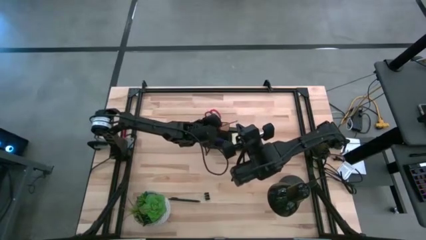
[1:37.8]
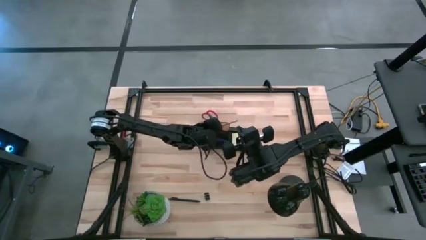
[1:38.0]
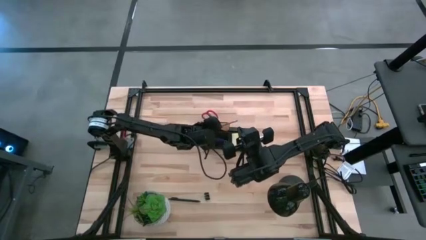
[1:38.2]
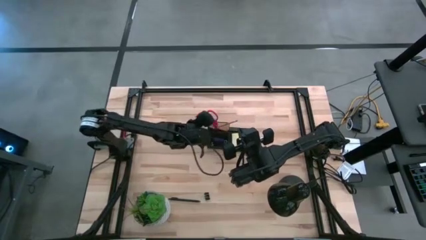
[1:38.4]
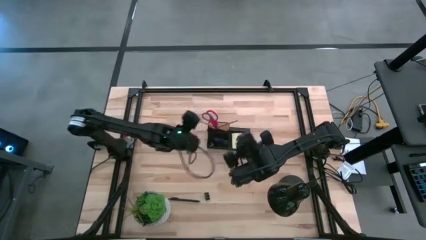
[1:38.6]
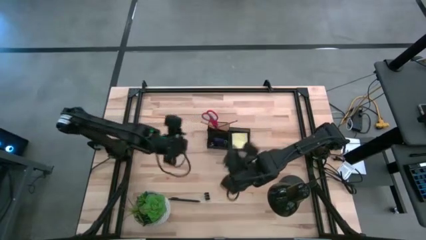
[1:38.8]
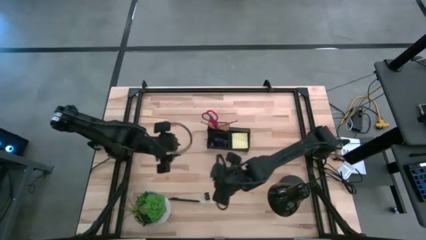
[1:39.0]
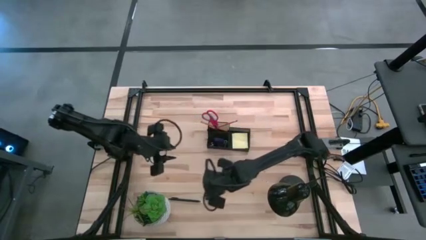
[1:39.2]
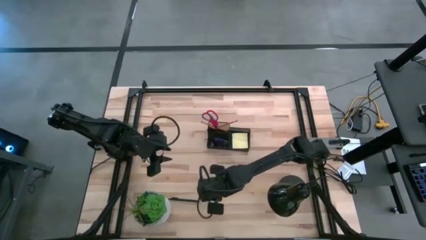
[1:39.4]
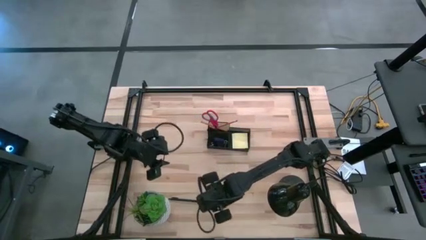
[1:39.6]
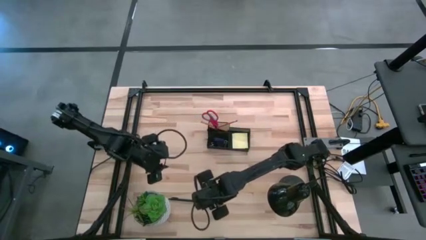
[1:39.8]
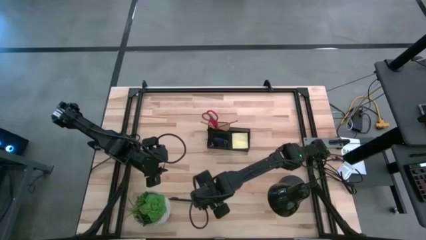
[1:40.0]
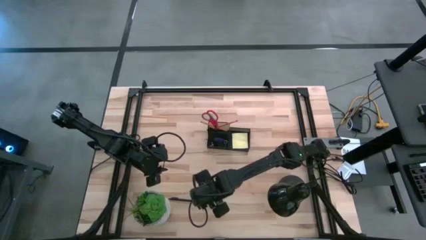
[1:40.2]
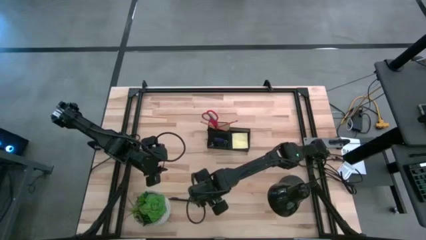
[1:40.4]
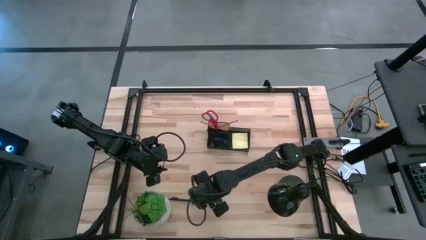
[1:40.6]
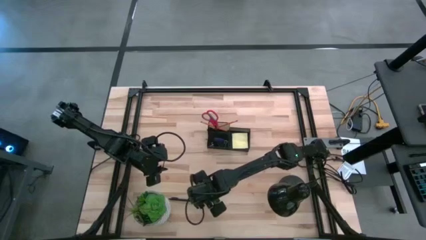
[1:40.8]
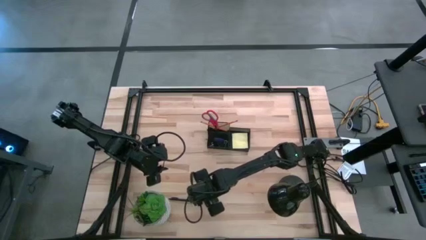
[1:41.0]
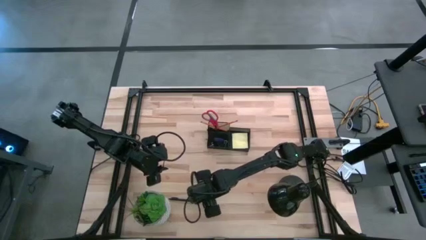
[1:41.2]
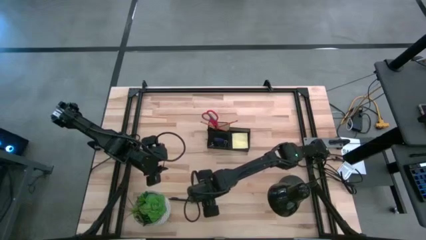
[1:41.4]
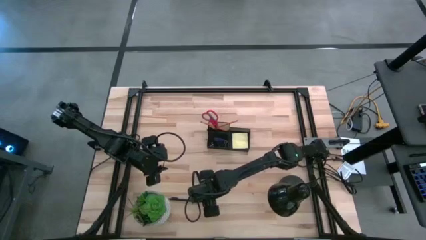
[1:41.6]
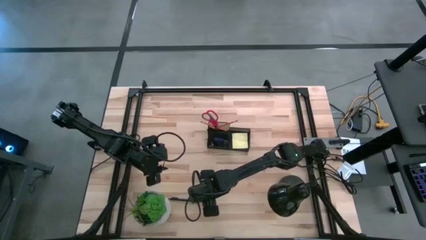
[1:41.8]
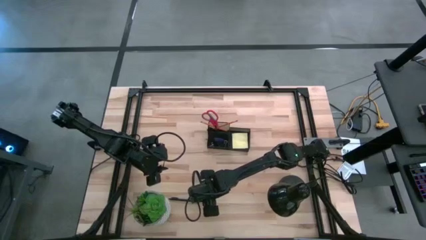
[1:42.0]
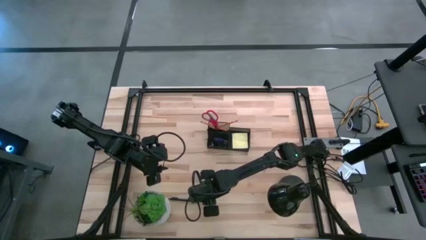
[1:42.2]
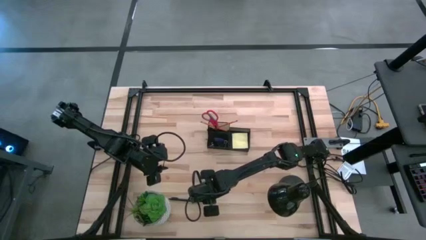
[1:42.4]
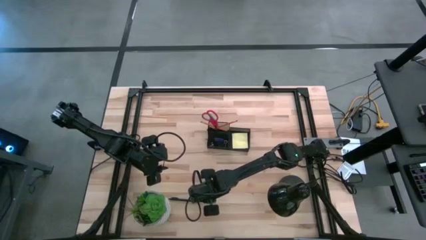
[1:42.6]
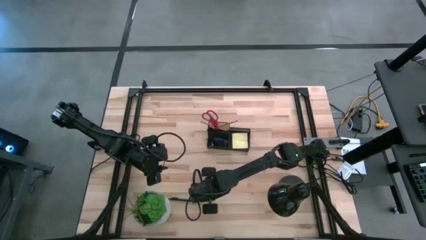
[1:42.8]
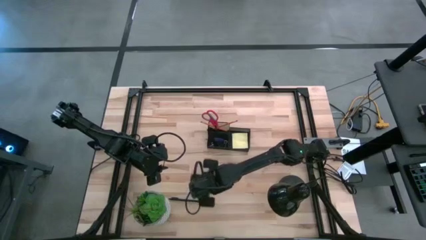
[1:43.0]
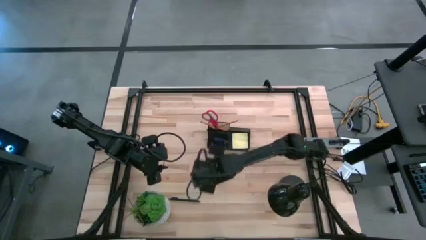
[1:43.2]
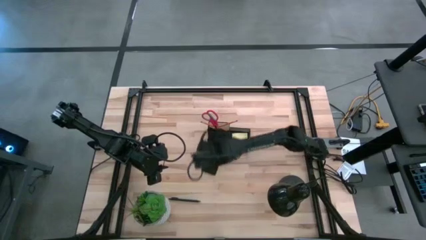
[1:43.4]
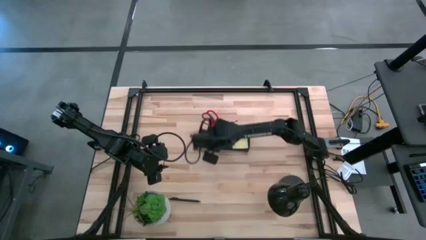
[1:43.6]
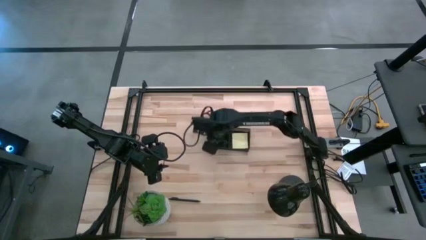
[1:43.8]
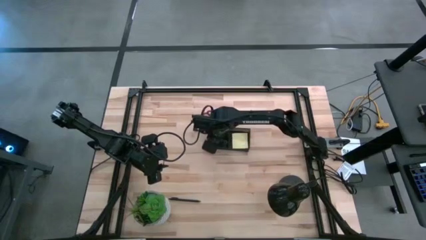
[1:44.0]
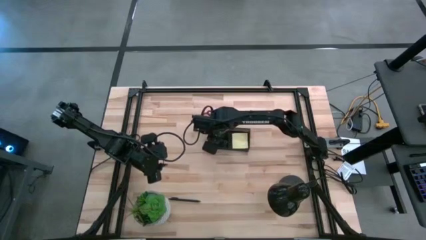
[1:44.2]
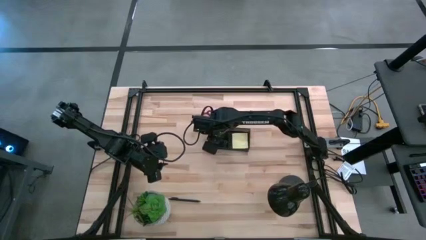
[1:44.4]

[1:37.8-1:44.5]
Task: Pick and place office supplies into organizer
Put the black binder clip into the desk organizer

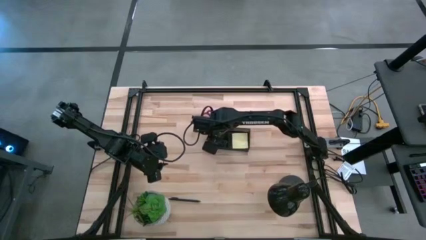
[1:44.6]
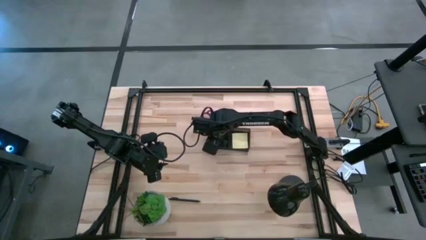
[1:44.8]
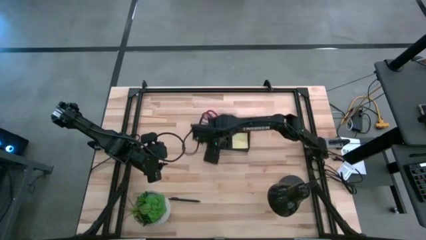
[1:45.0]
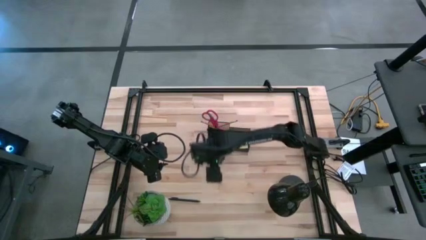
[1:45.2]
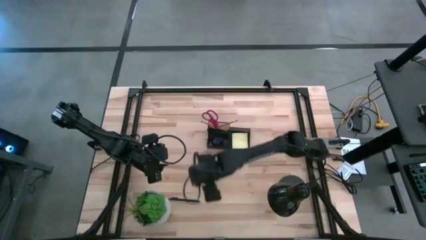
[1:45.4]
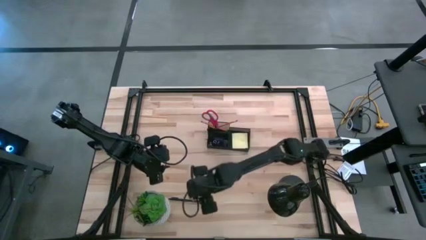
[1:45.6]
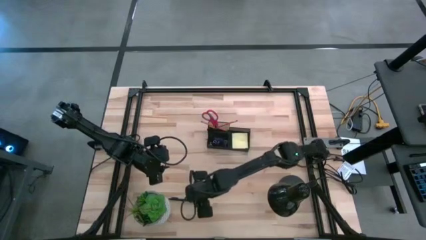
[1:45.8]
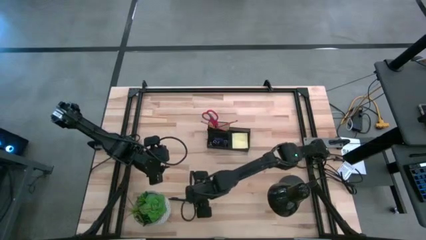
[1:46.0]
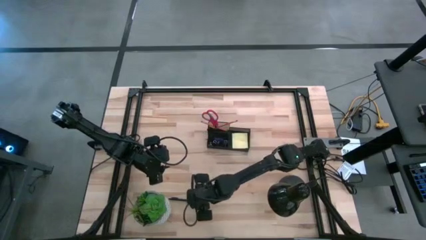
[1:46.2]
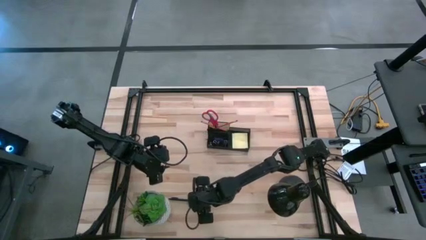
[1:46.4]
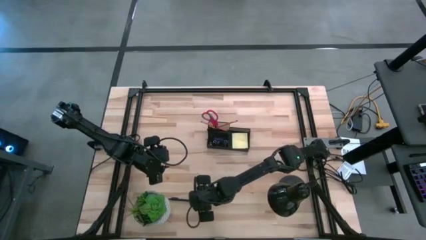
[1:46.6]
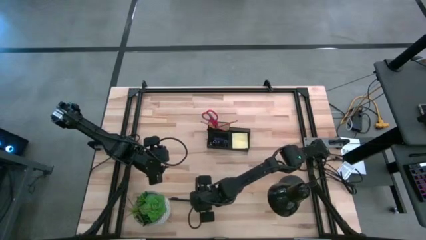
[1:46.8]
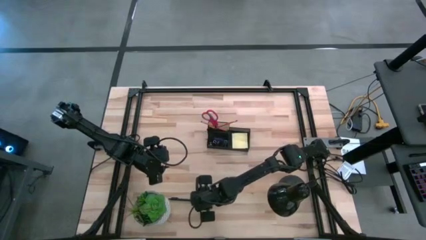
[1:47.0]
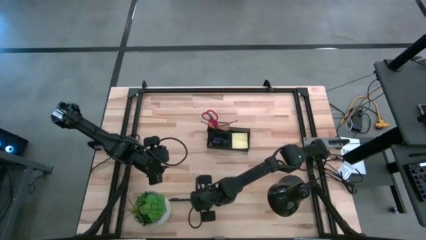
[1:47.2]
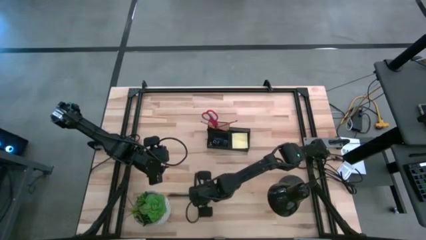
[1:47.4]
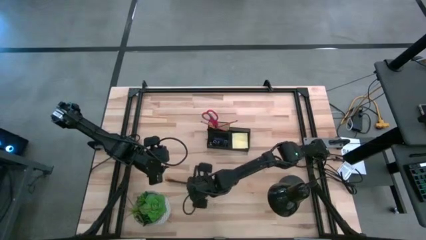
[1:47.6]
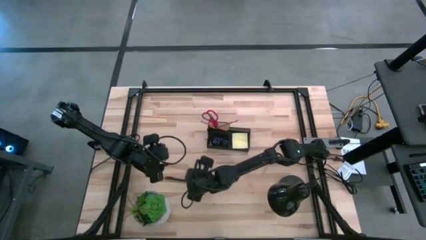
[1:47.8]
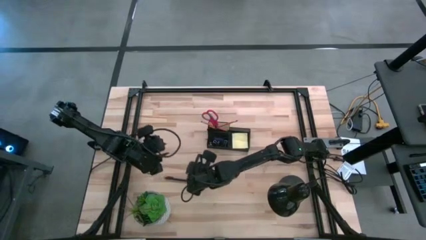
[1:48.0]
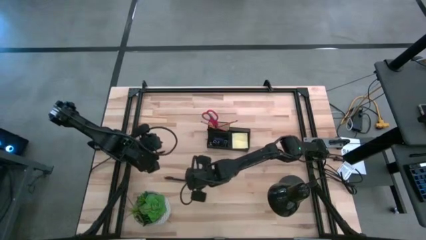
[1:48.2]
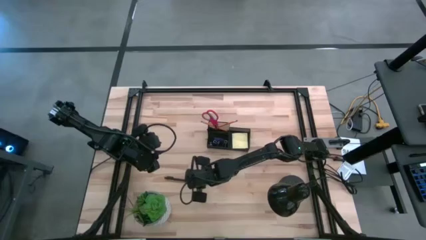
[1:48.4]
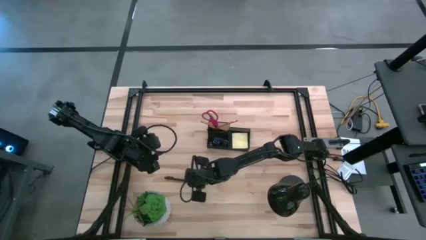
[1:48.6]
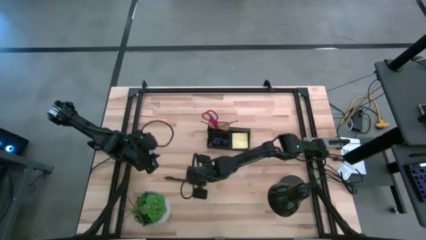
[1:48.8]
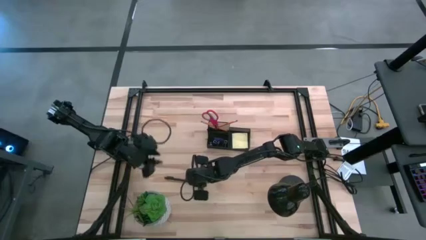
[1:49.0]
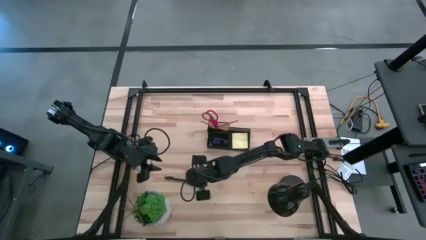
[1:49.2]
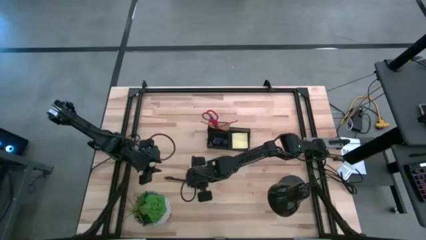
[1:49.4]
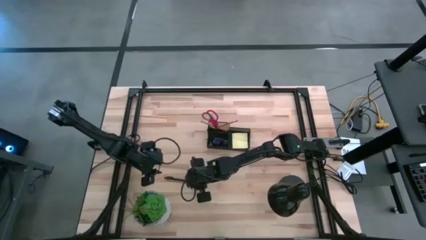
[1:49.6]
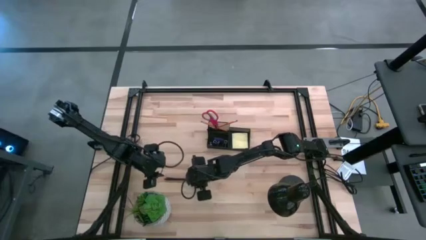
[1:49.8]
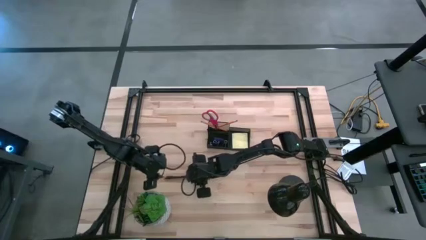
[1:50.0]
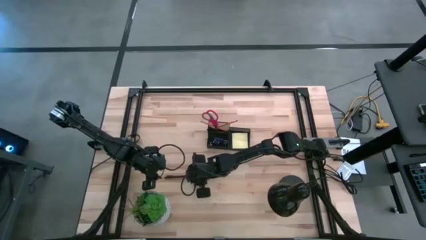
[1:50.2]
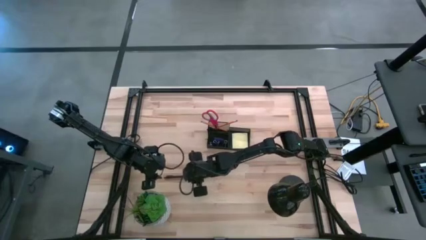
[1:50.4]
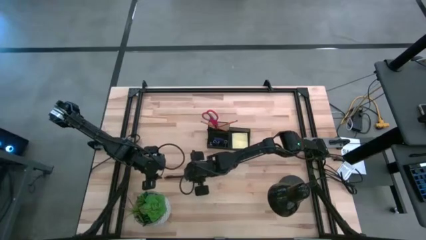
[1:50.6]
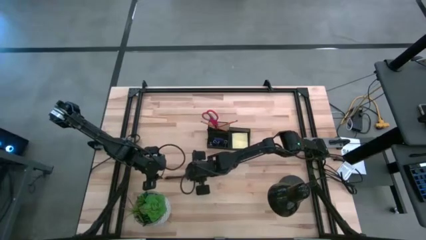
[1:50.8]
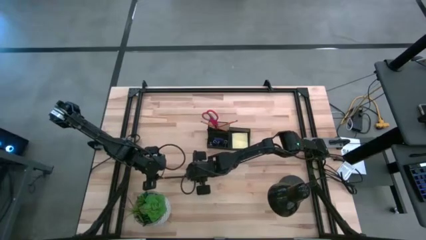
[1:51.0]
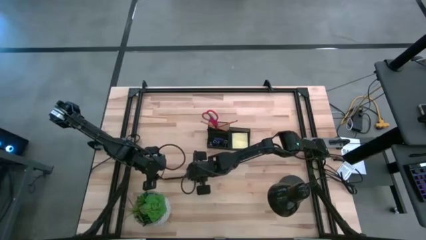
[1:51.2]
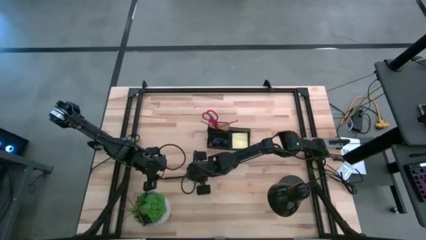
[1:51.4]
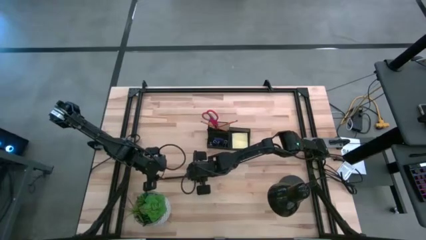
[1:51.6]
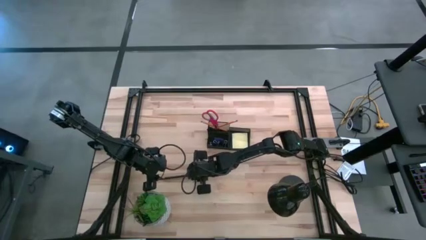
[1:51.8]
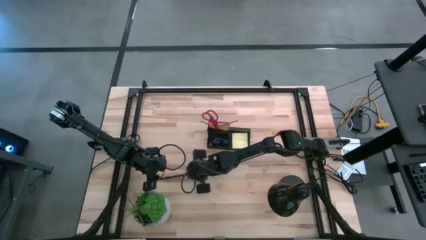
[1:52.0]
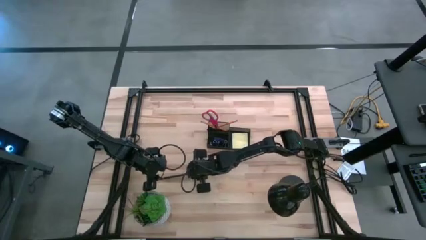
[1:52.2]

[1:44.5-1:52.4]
Put the black pen into the desk organizer
